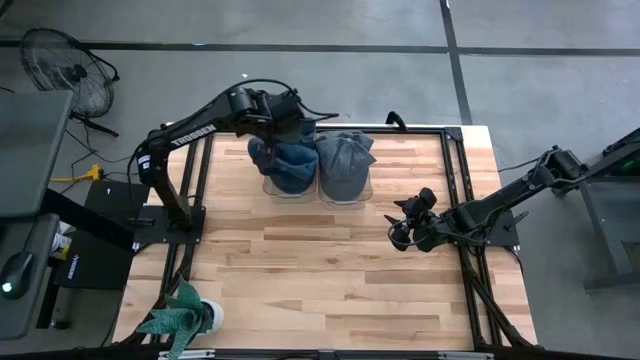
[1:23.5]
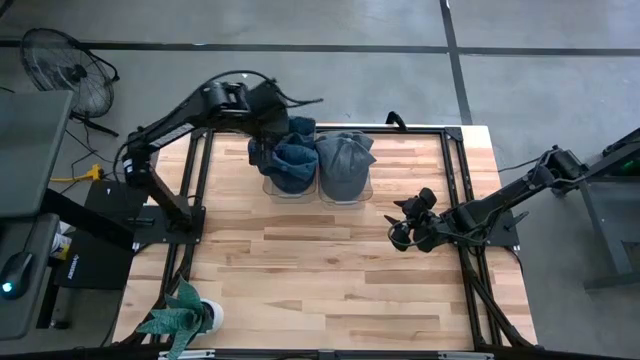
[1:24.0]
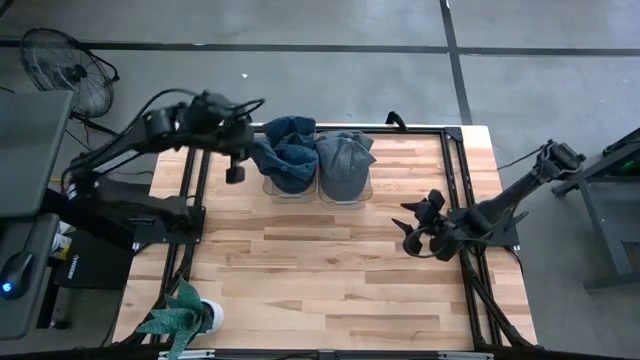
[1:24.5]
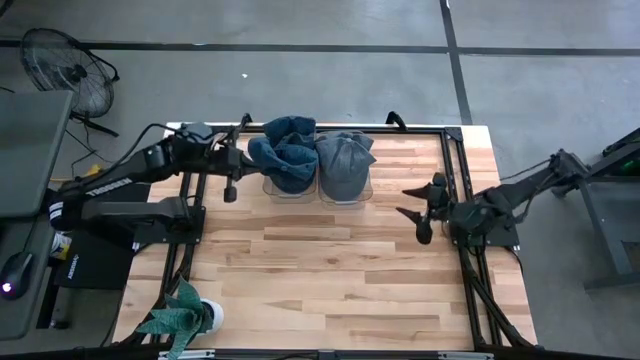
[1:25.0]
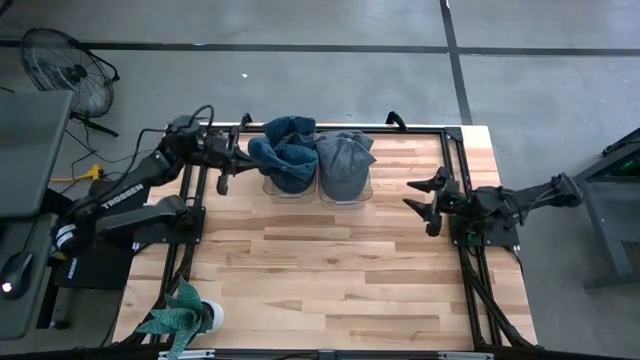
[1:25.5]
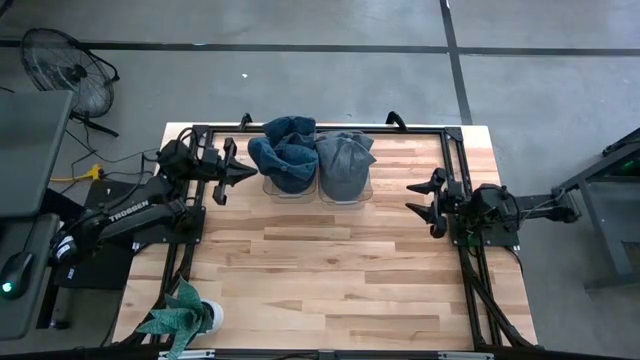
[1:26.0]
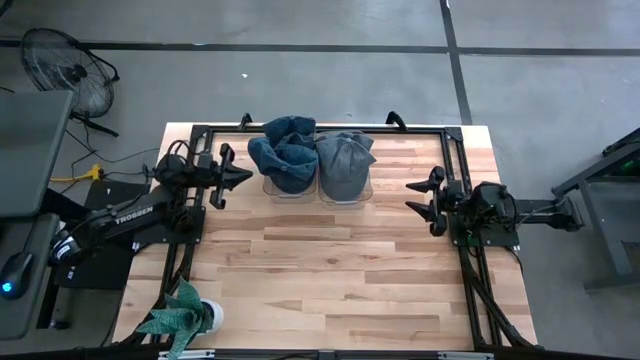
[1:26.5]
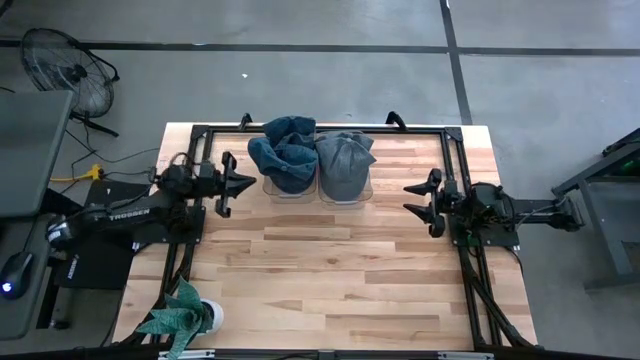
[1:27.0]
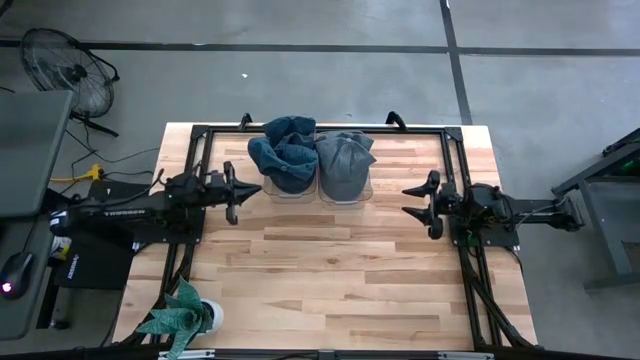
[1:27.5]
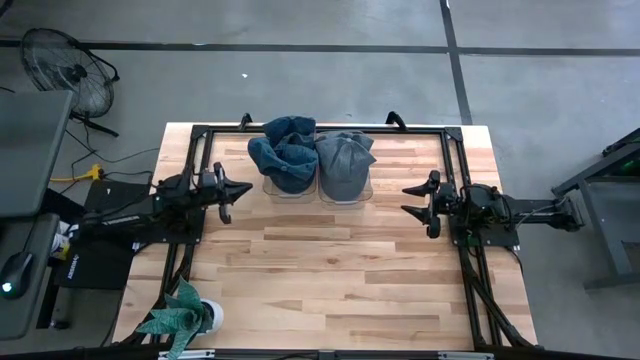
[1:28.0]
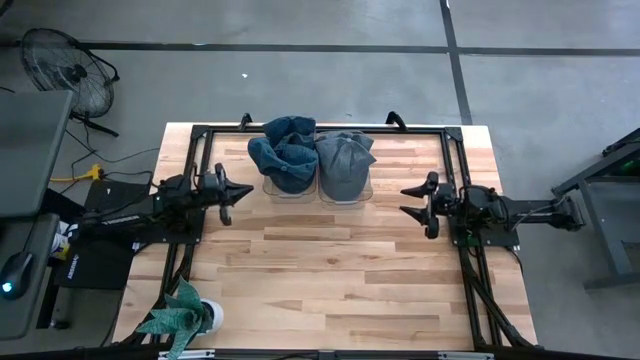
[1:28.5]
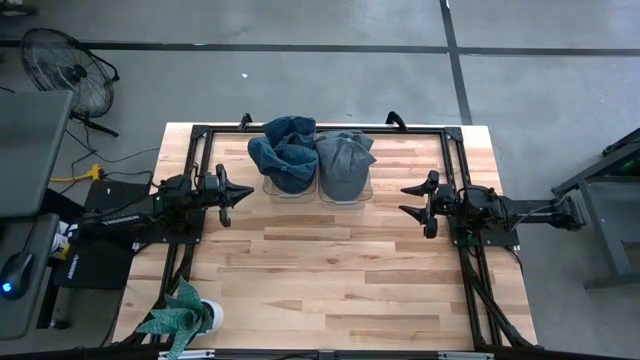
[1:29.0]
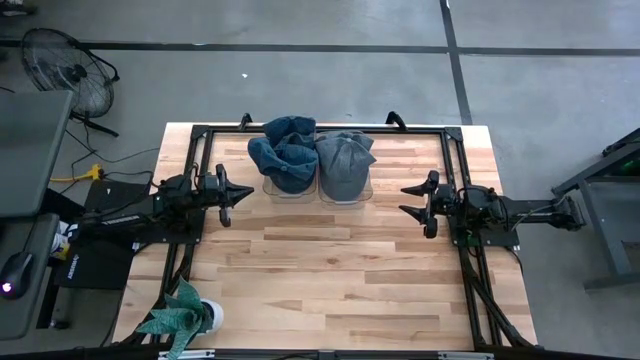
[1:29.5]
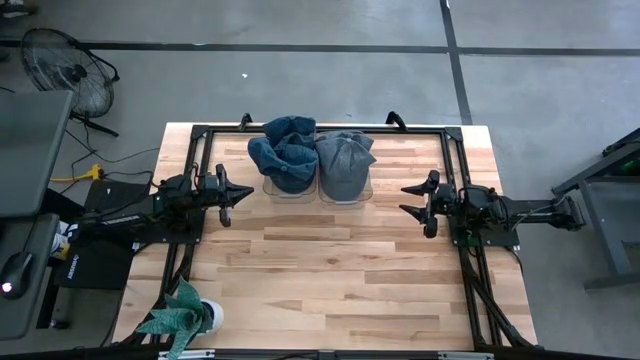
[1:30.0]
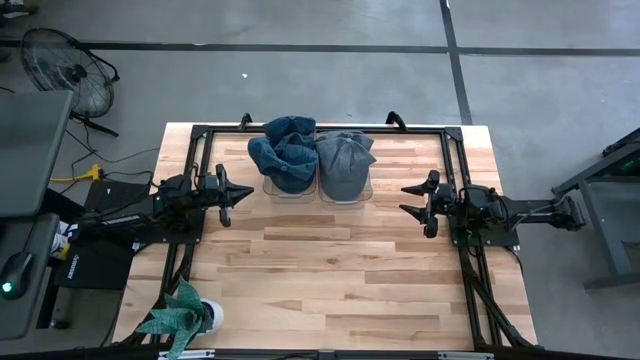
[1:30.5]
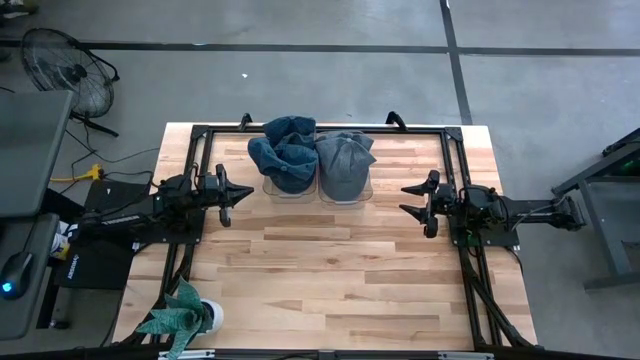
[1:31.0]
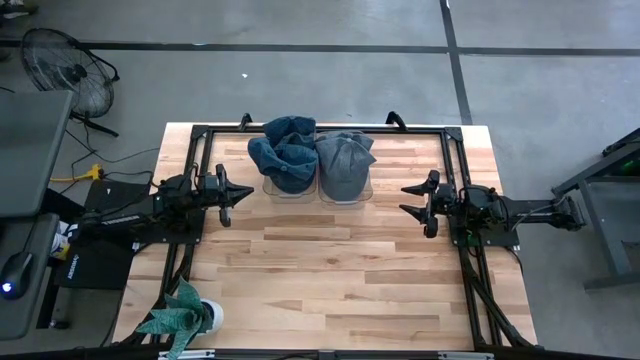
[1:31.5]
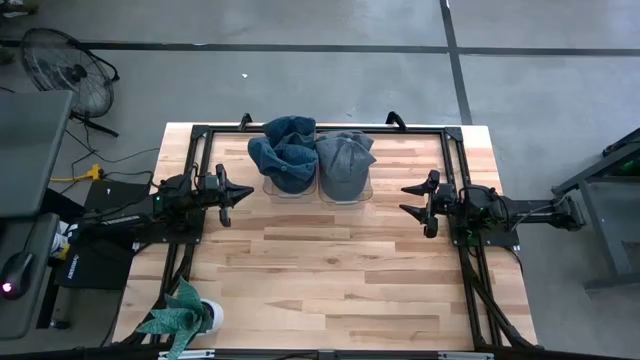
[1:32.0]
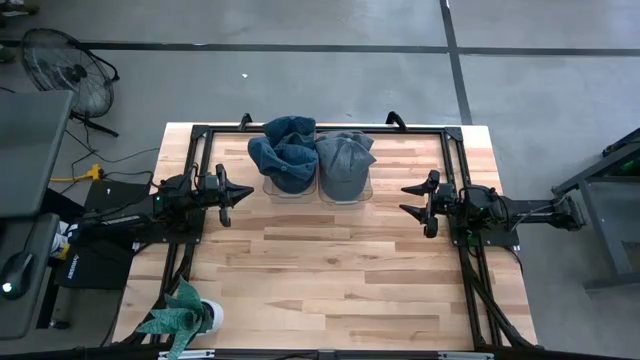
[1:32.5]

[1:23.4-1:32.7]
Task: Pick & Place hat
Return to Home Position

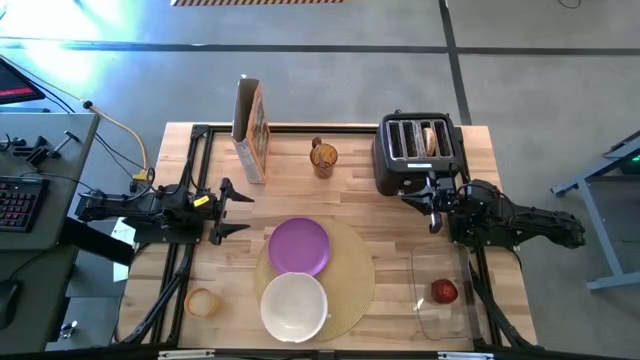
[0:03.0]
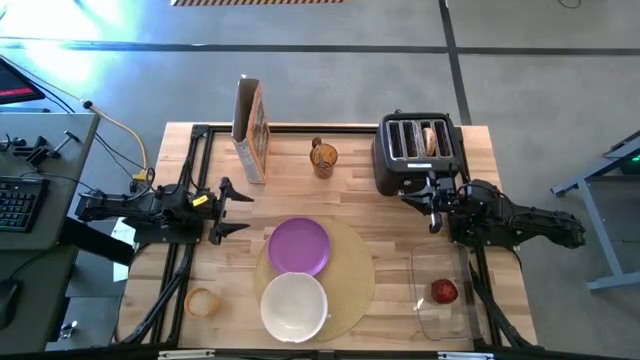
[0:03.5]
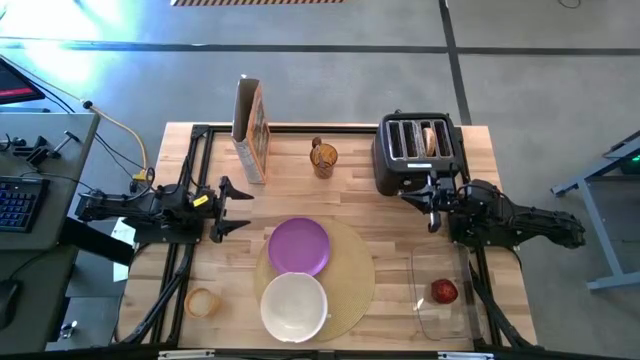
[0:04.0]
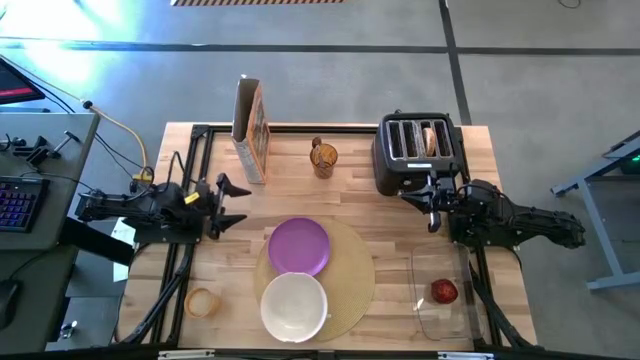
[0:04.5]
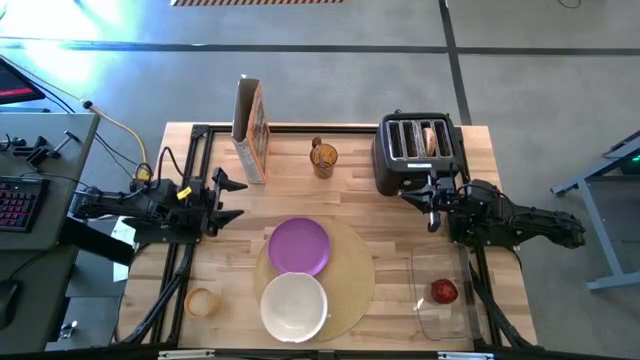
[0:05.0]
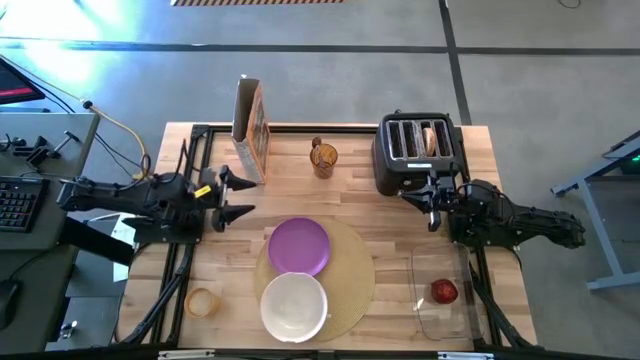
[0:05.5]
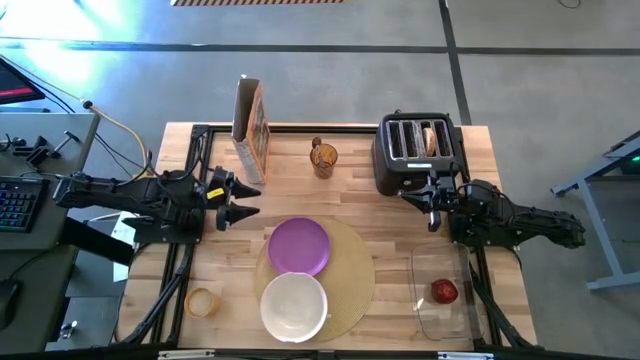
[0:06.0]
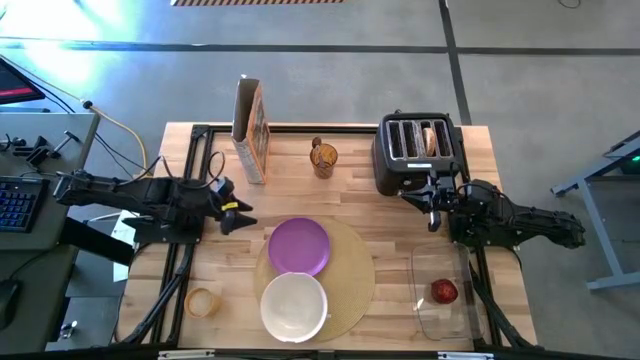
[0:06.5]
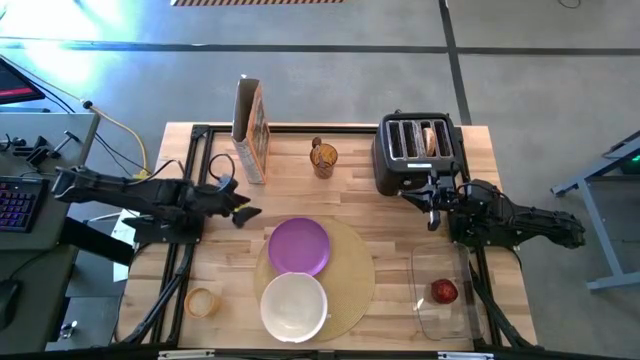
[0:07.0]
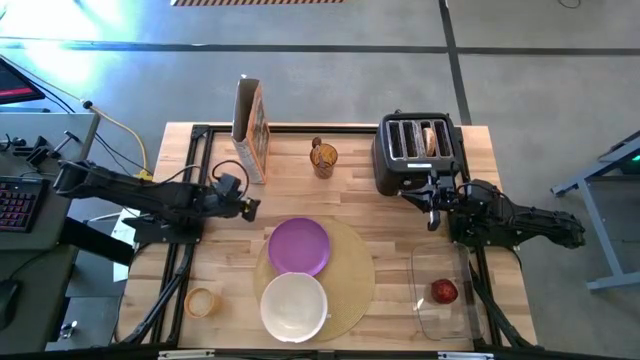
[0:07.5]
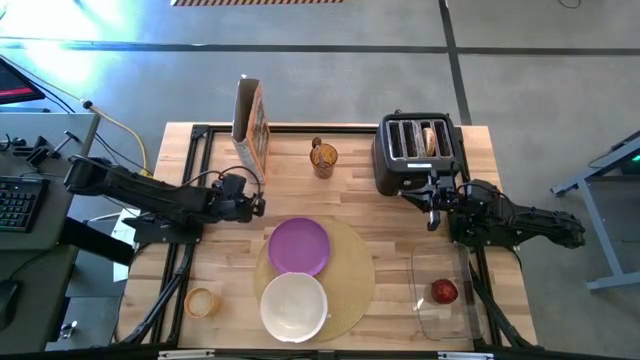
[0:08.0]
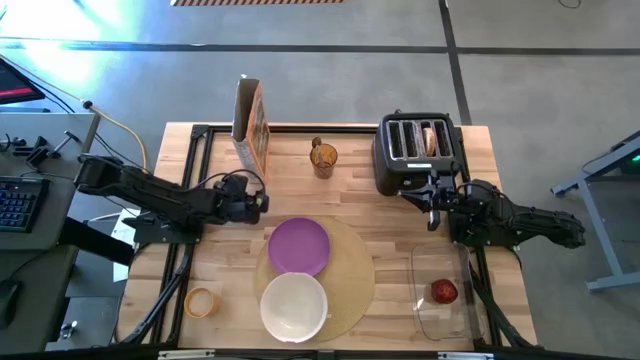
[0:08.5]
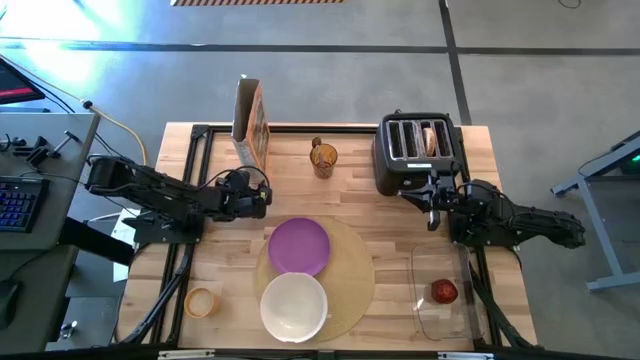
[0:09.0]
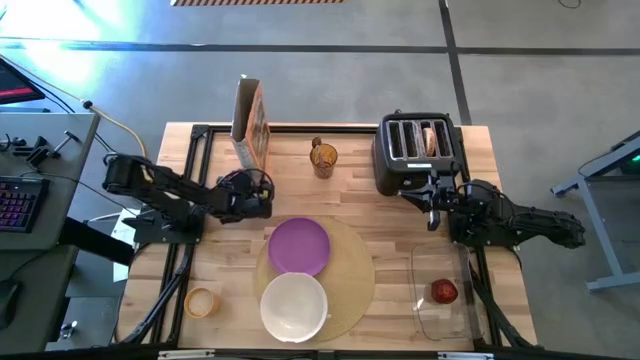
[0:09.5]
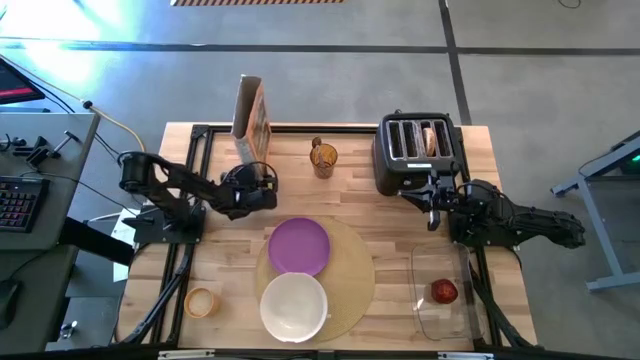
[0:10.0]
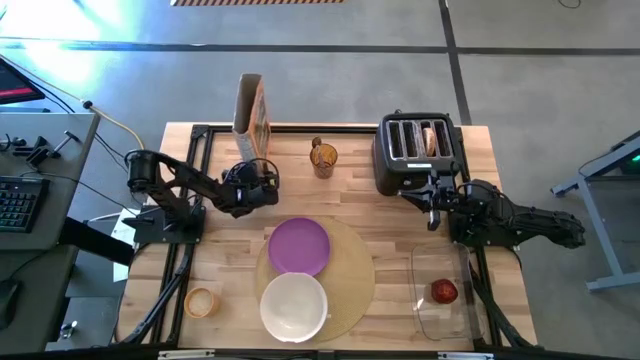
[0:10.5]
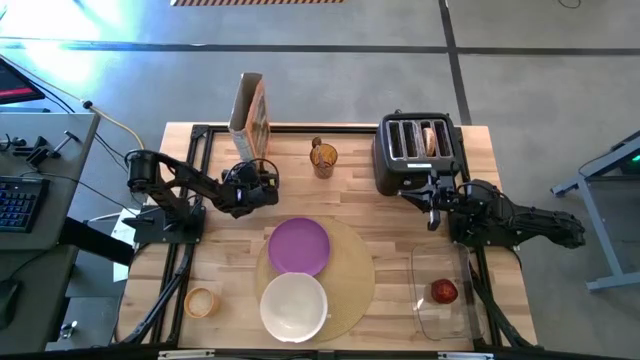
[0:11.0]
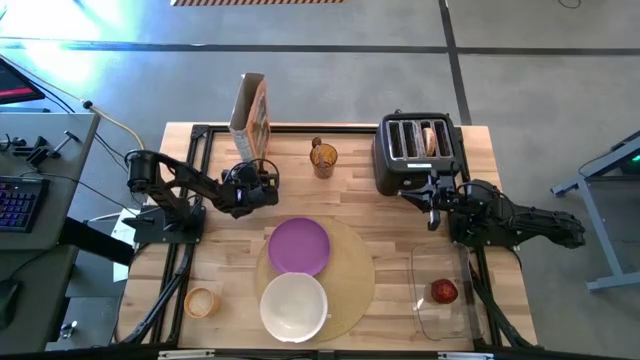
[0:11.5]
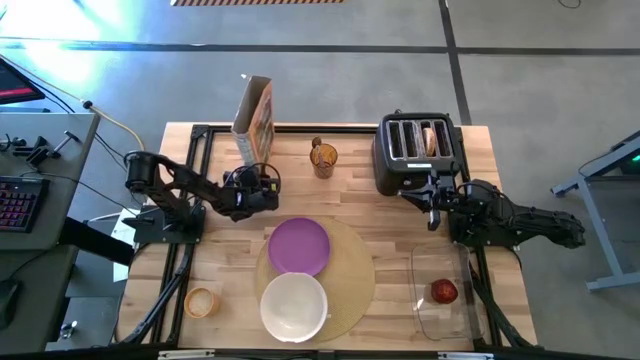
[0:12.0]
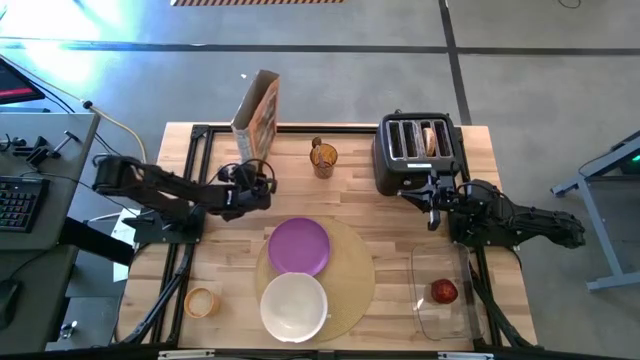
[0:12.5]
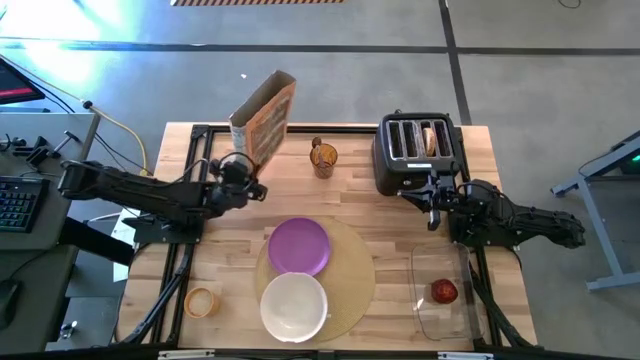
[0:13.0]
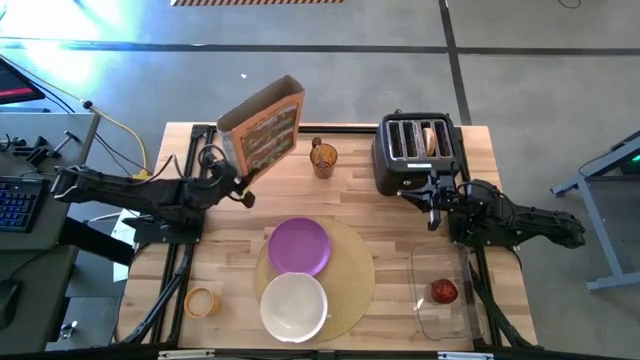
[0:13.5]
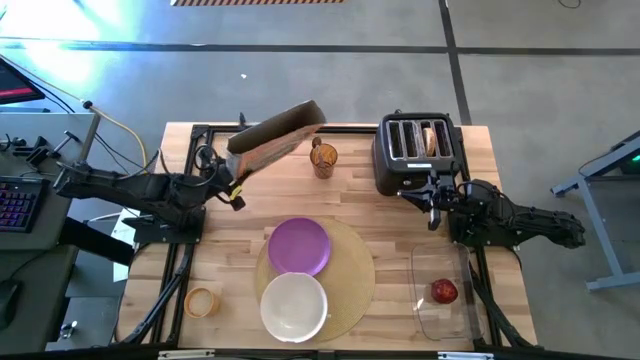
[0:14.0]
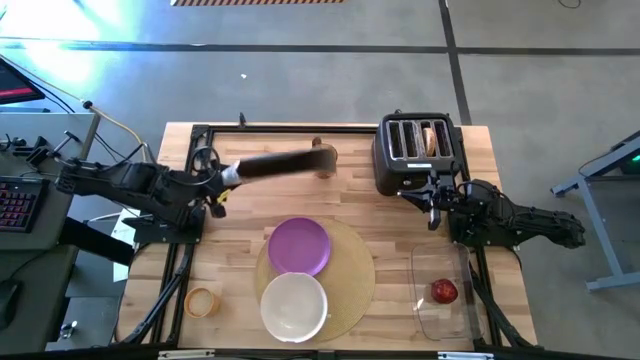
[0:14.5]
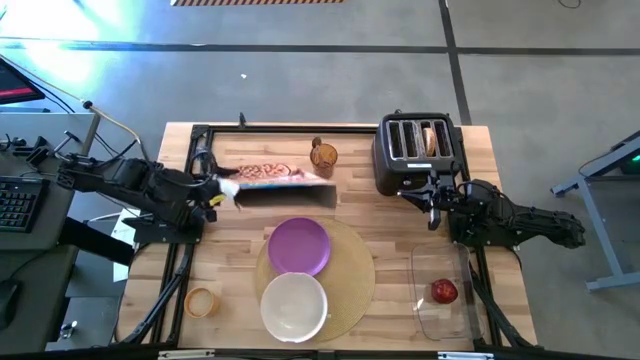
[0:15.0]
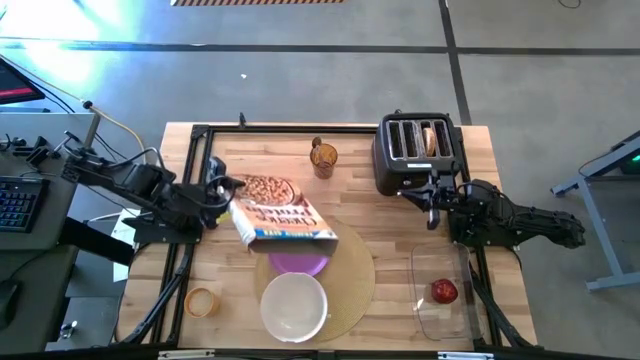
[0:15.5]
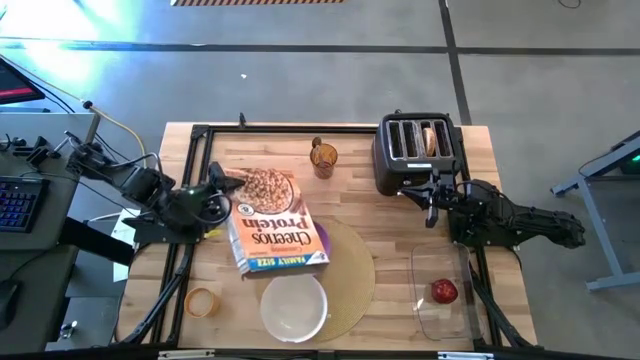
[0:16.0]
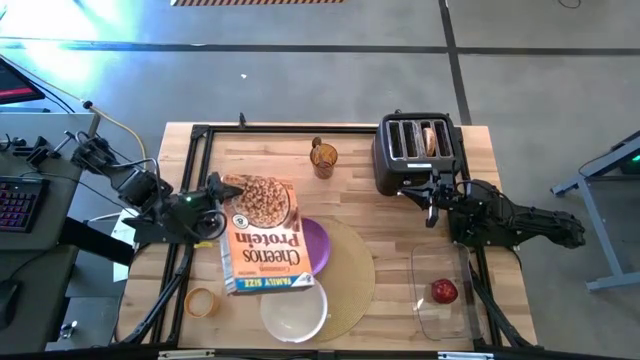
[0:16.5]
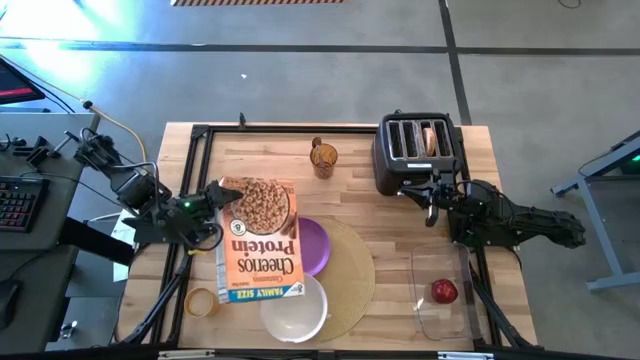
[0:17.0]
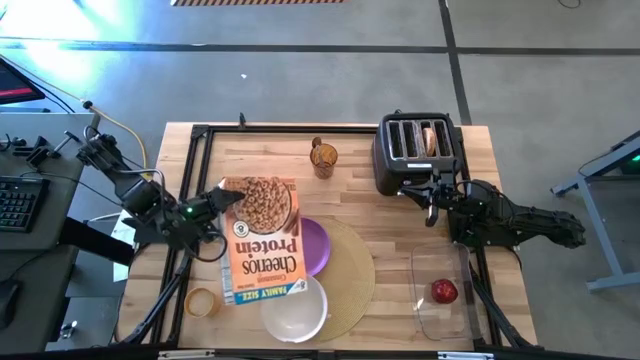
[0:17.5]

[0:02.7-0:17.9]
Task: Arrange a breakfast setting
Pour the cereal from the cereal box into the white bowl
